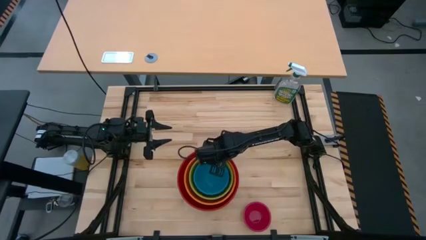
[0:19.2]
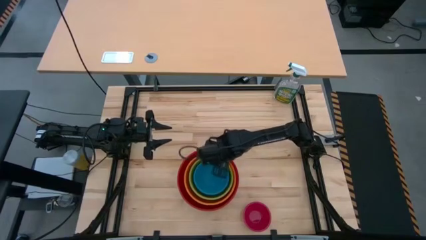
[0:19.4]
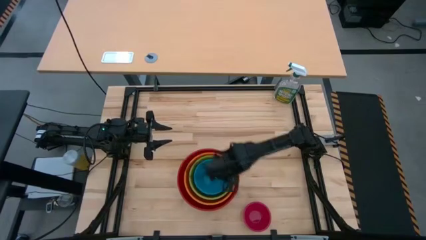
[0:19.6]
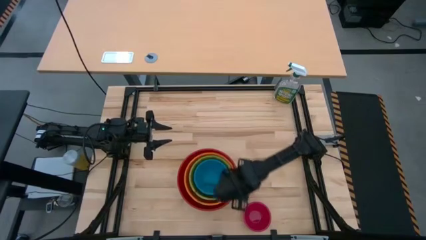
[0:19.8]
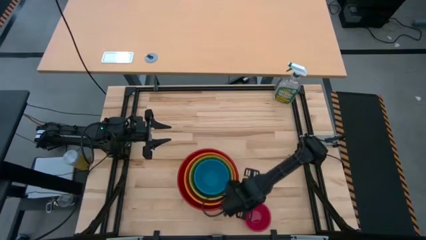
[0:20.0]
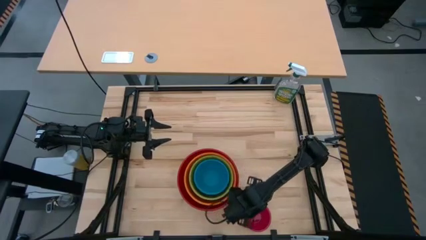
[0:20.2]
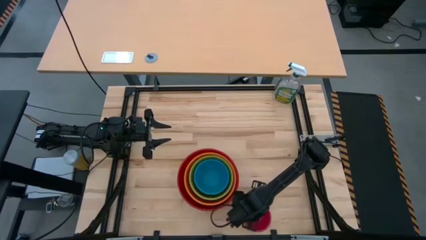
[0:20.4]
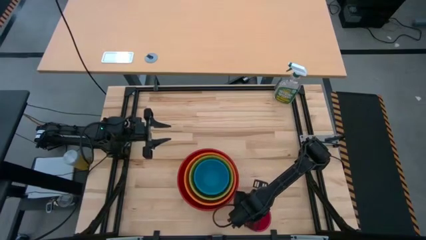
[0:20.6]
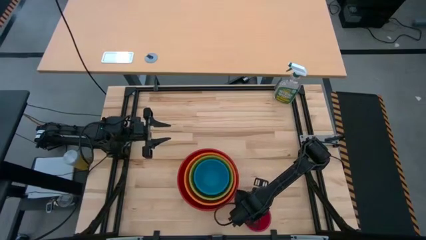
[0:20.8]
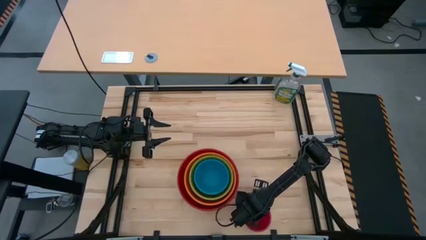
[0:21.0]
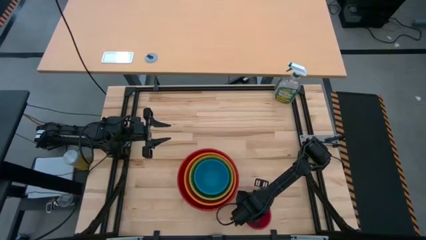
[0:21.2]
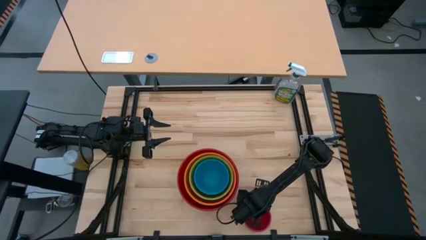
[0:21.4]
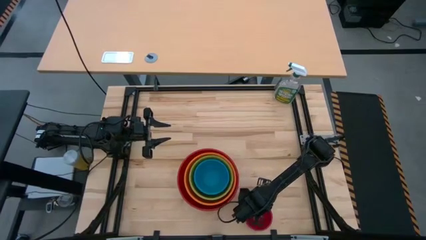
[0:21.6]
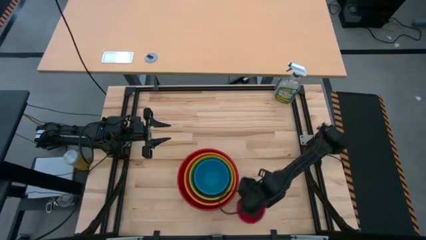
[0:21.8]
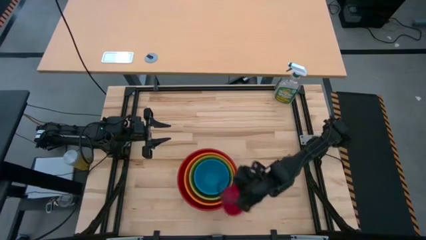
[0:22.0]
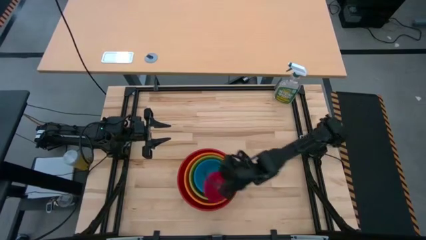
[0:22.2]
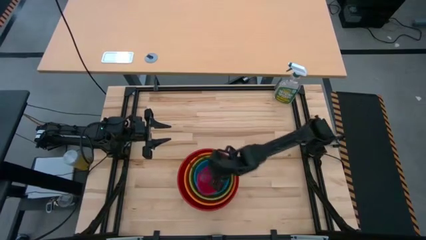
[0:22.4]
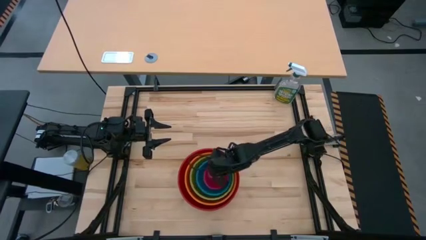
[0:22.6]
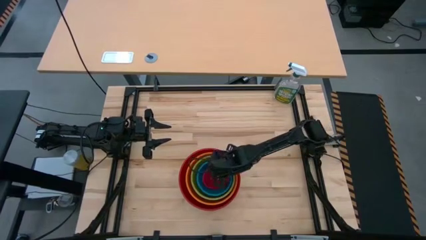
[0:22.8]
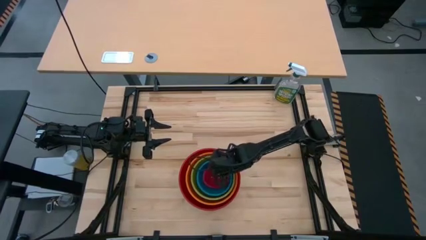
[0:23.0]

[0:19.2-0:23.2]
Stack the extra small pink bowl on top of the small blue bowl

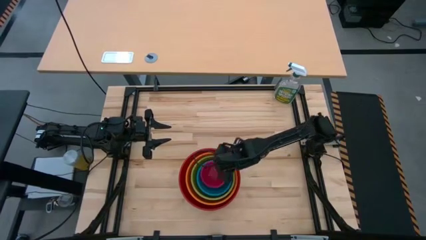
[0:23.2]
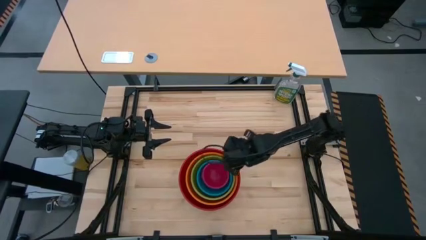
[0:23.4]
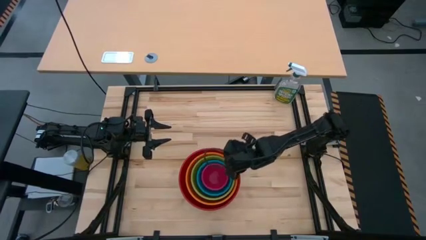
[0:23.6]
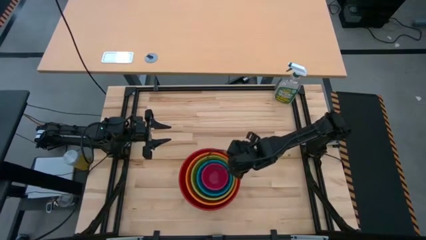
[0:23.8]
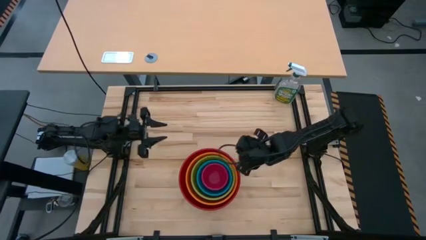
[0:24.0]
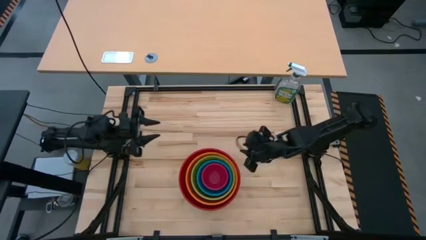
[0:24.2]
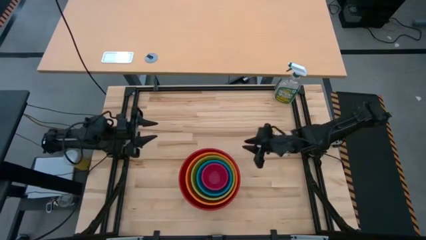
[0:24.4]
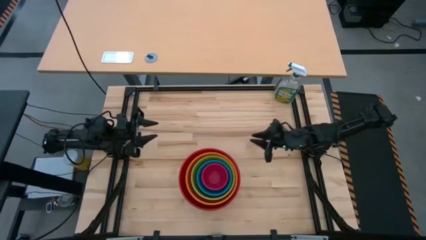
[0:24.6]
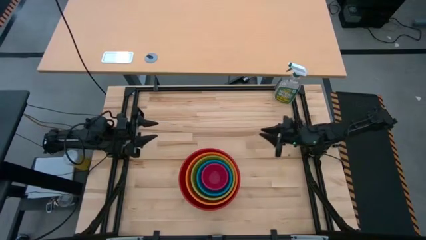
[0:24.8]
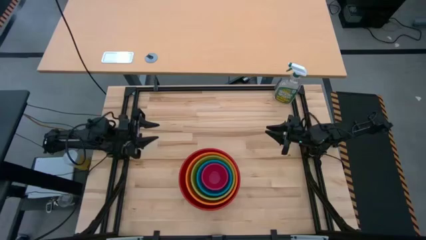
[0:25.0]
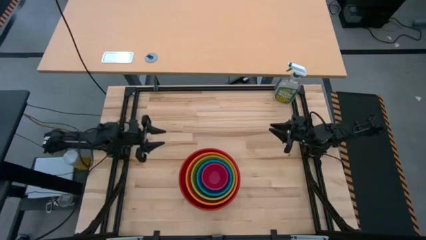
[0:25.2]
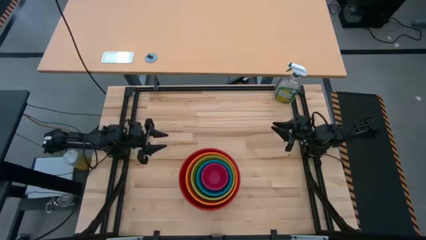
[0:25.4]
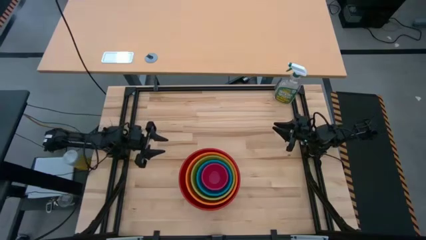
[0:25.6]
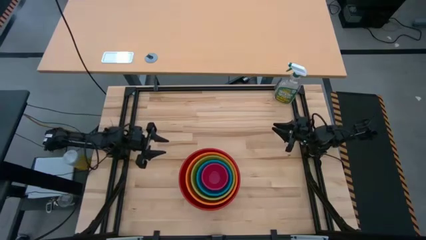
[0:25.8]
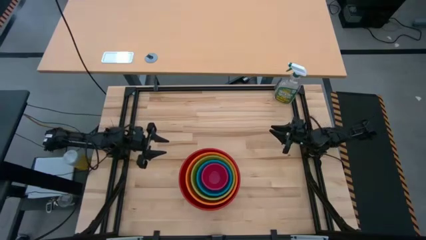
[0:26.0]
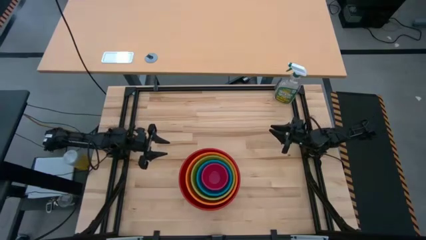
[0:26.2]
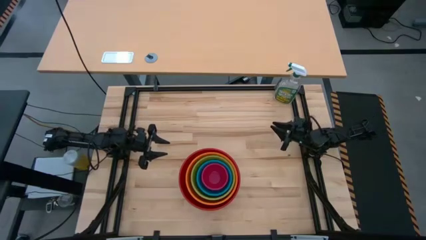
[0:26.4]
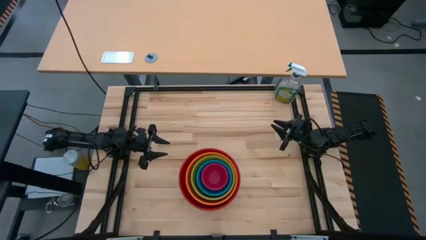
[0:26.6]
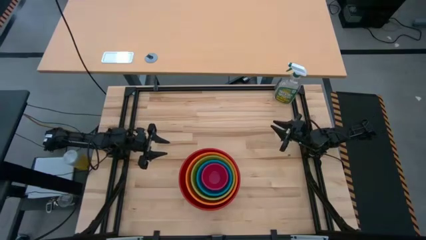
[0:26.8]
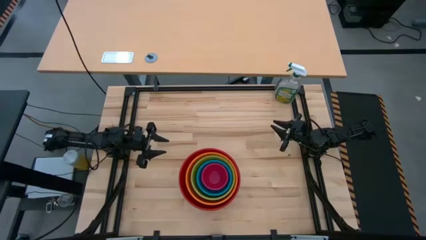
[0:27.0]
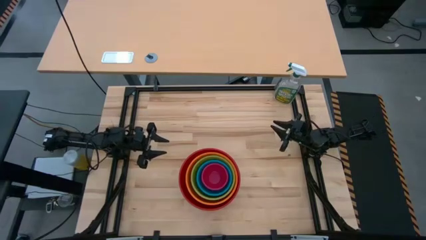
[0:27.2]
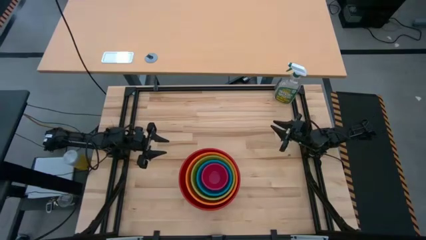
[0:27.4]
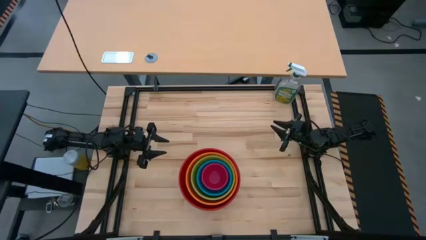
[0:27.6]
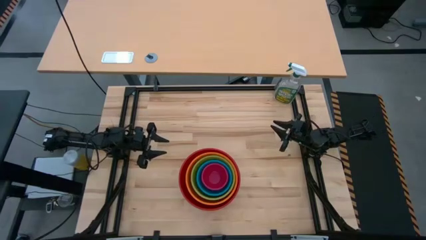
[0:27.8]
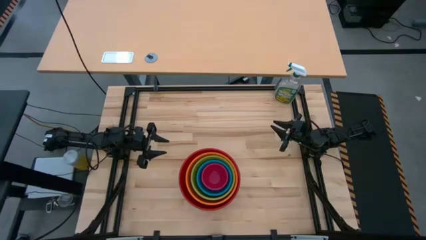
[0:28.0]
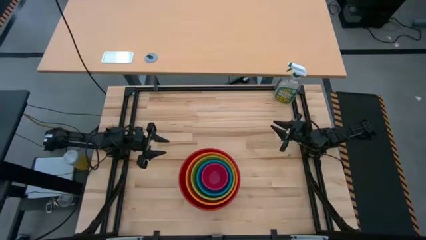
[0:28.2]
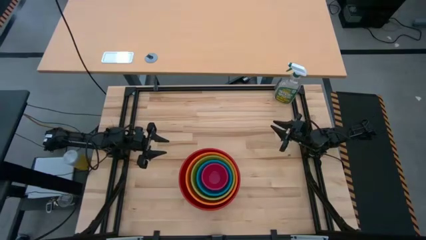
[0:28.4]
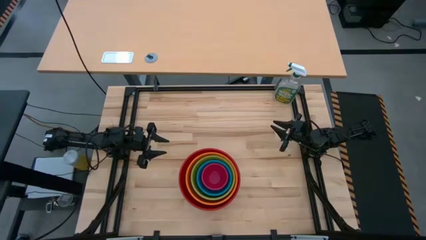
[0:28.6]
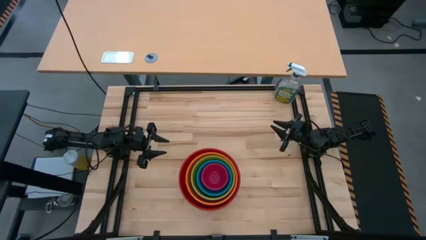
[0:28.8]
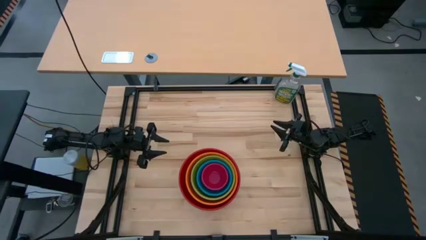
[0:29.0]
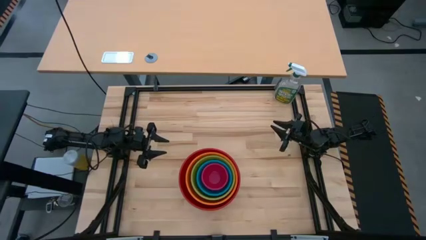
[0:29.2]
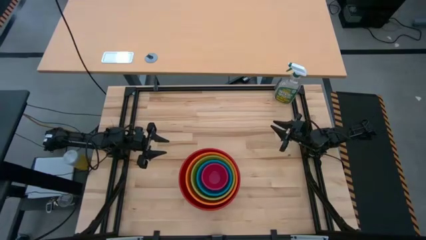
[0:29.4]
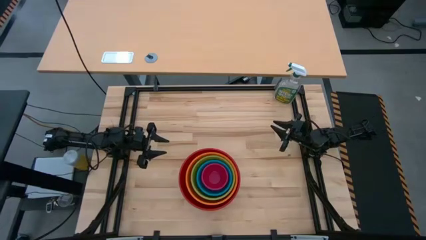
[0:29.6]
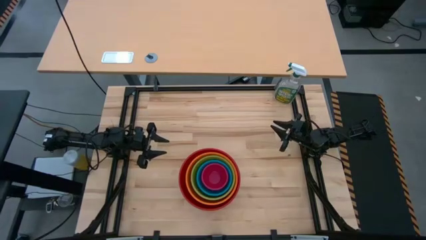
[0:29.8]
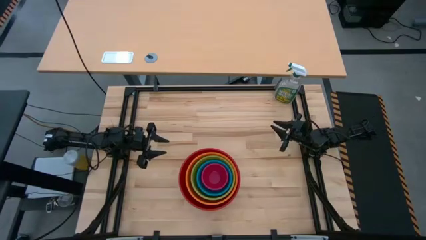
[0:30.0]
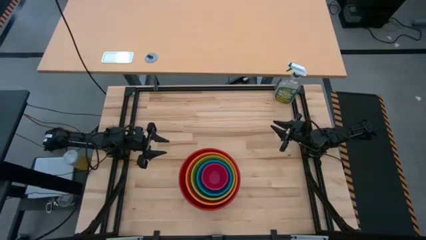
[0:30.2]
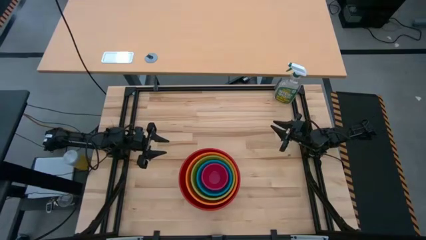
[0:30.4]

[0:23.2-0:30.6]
Return to Home Position

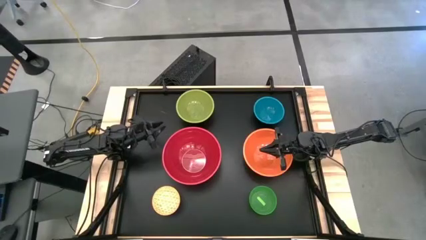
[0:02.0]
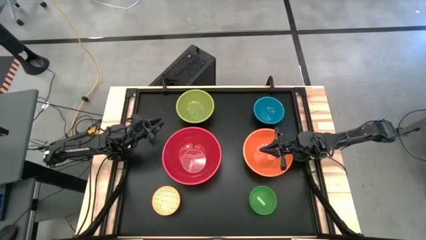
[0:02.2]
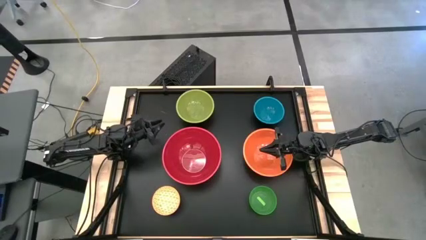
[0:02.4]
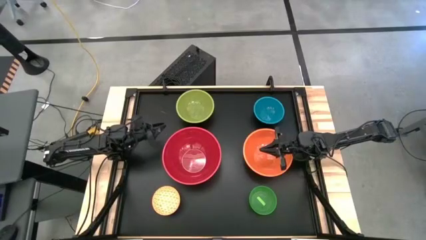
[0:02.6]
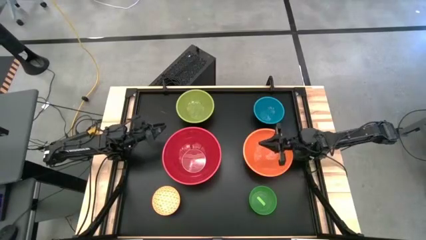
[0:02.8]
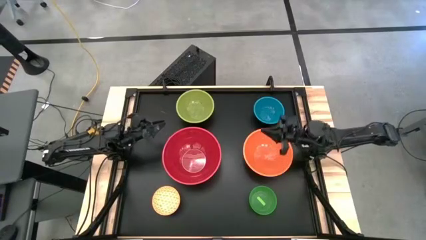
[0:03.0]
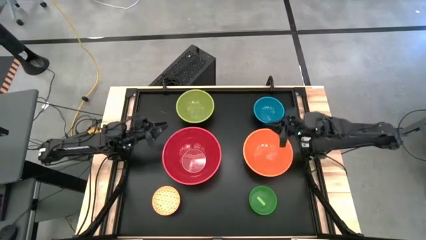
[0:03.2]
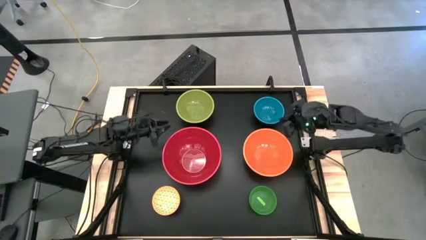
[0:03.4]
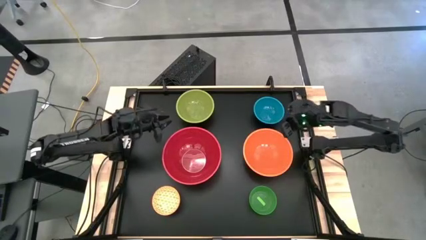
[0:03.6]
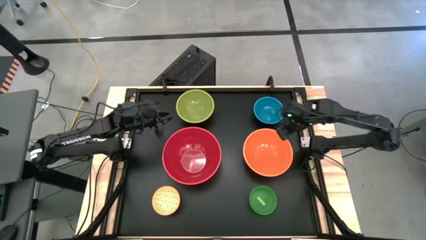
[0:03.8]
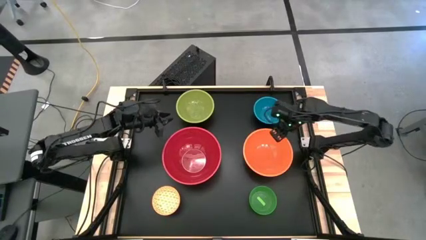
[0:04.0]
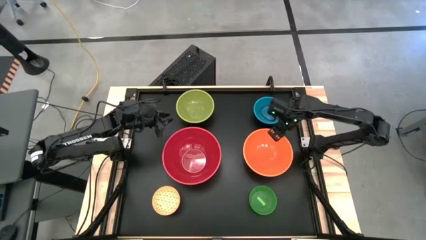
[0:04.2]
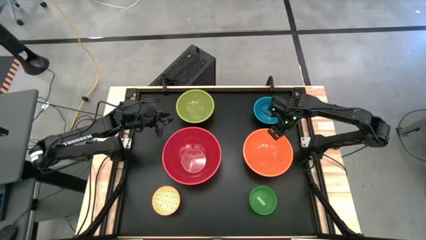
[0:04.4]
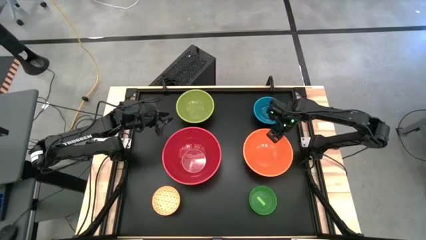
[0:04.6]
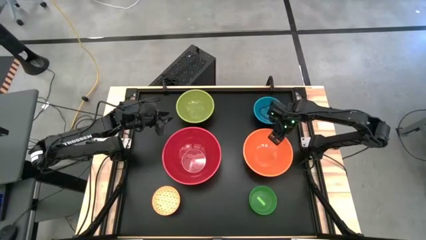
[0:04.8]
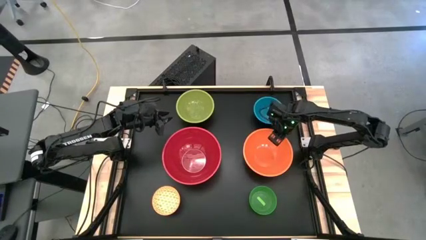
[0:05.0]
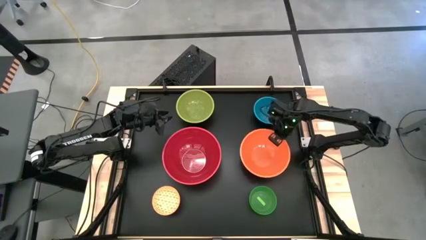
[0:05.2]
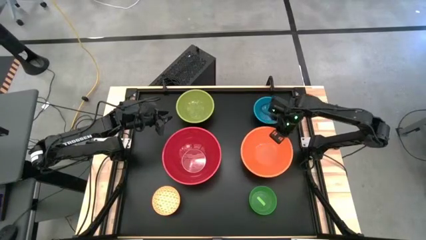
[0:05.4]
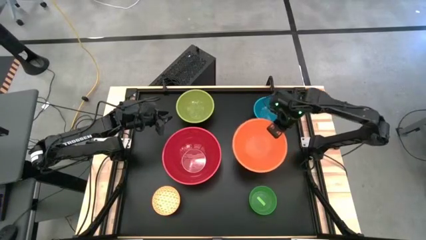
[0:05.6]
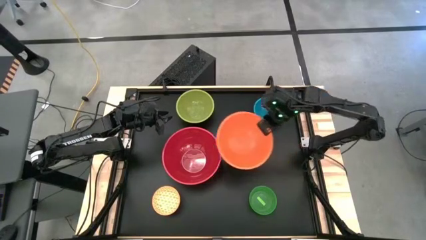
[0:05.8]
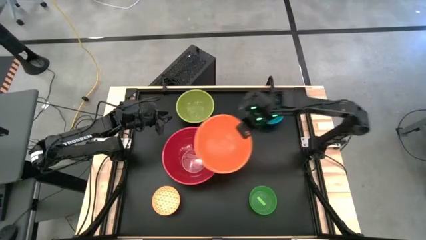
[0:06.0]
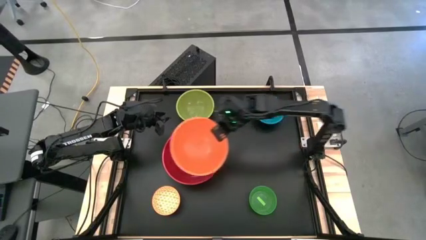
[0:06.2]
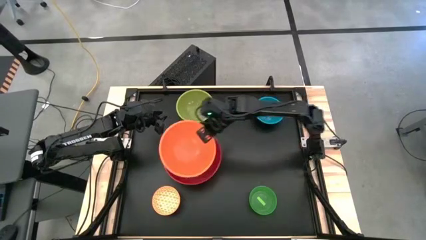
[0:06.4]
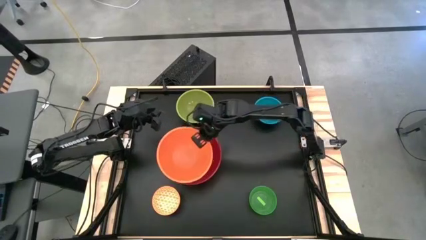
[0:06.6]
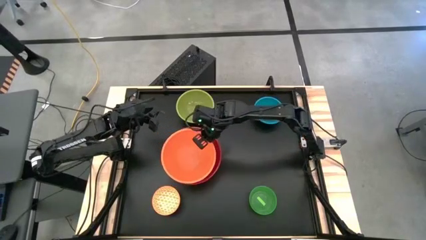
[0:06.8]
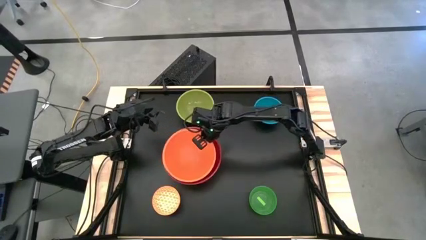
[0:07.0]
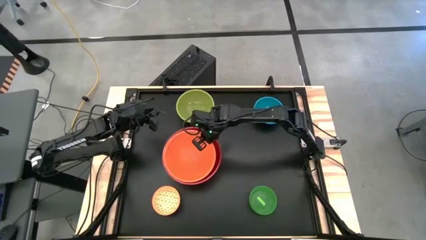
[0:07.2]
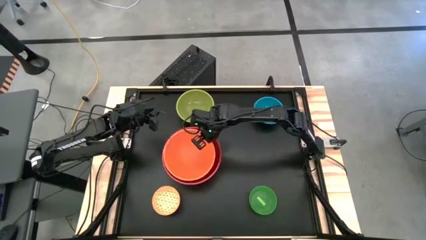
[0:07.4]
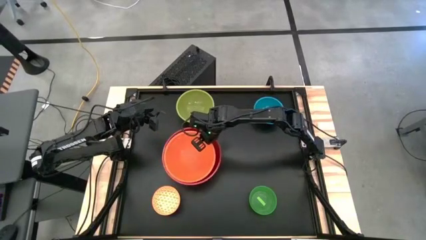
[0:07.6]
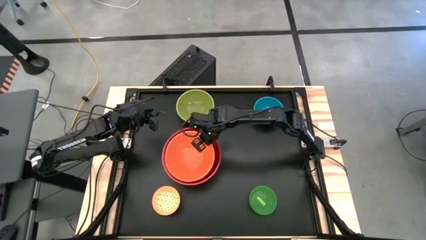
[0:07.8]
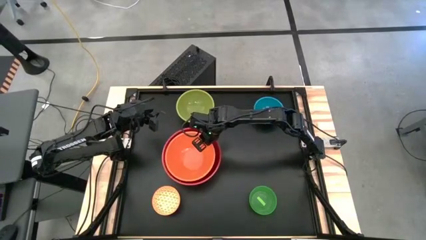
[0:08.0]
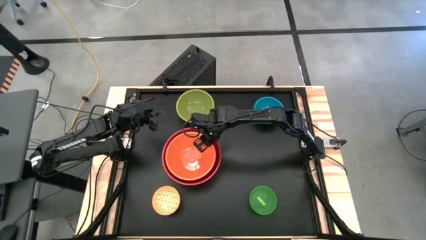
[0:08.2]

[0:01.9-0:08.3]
Stack the orange bowl on top of the red bowl
